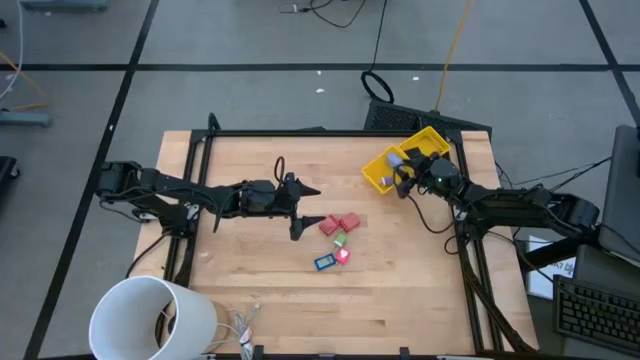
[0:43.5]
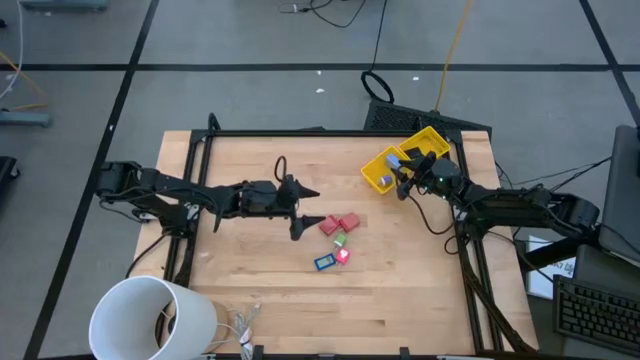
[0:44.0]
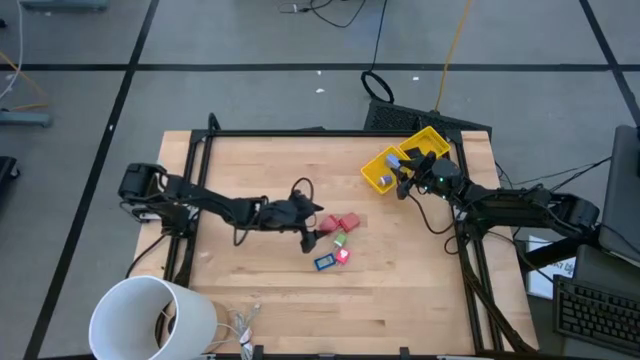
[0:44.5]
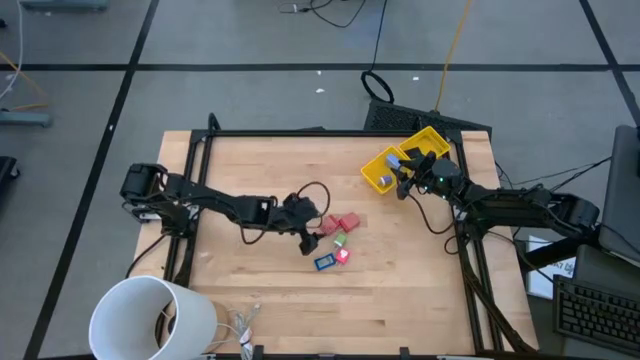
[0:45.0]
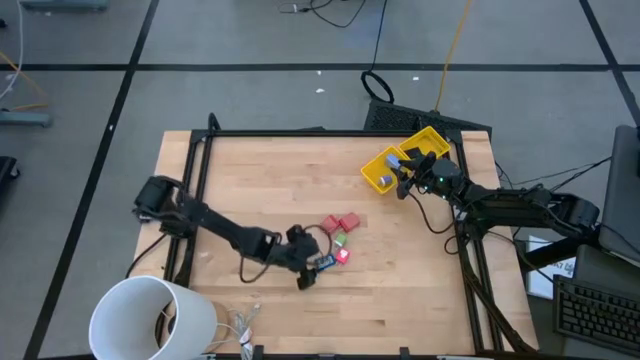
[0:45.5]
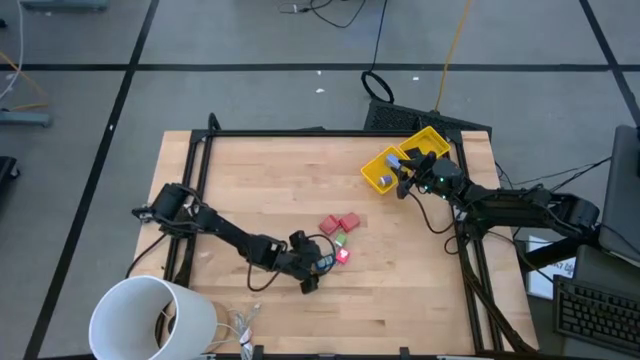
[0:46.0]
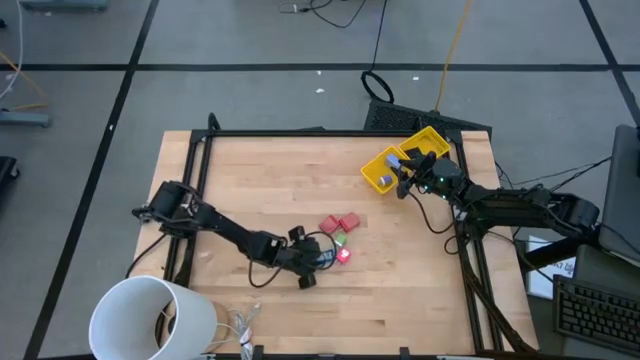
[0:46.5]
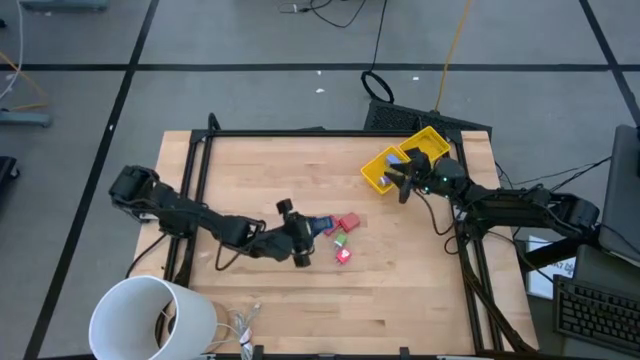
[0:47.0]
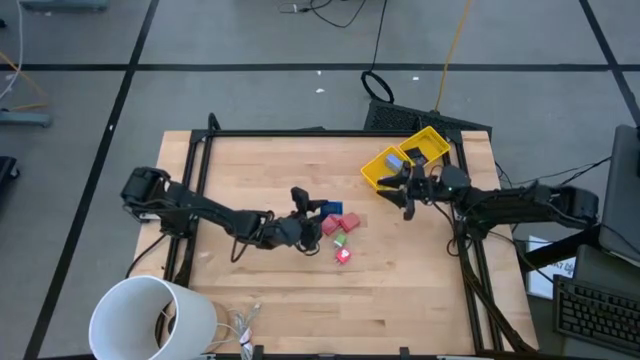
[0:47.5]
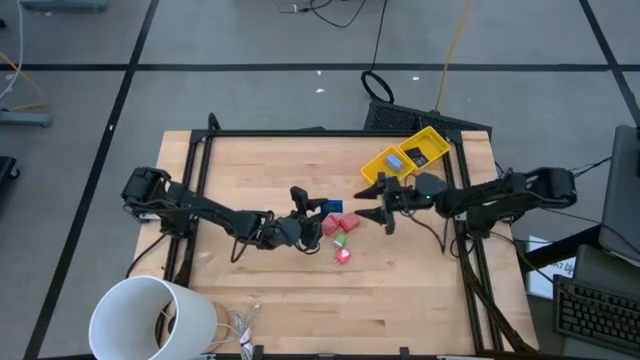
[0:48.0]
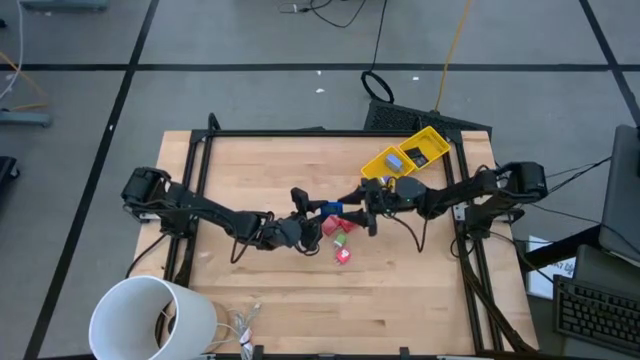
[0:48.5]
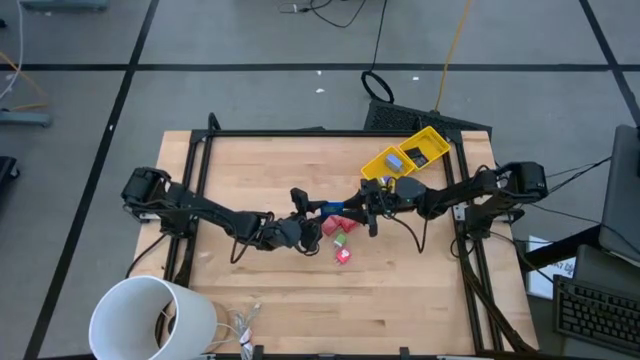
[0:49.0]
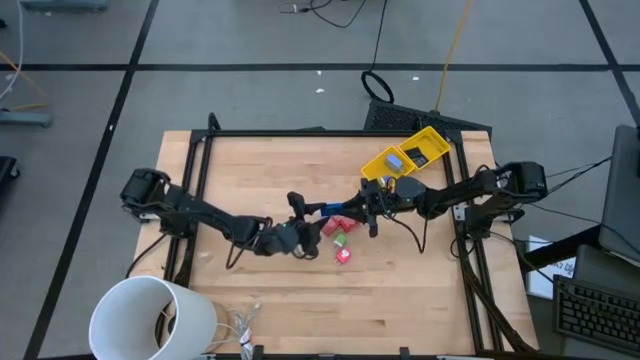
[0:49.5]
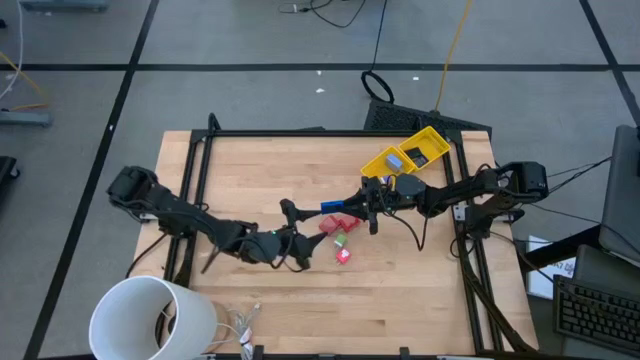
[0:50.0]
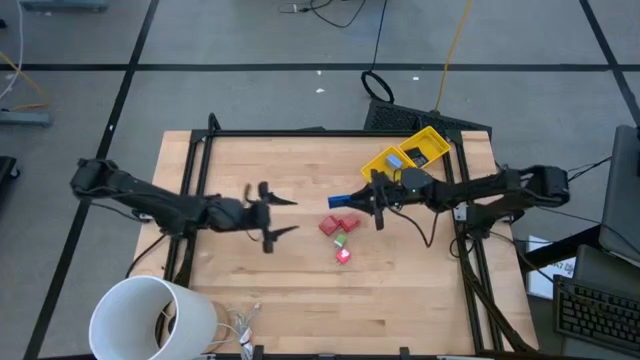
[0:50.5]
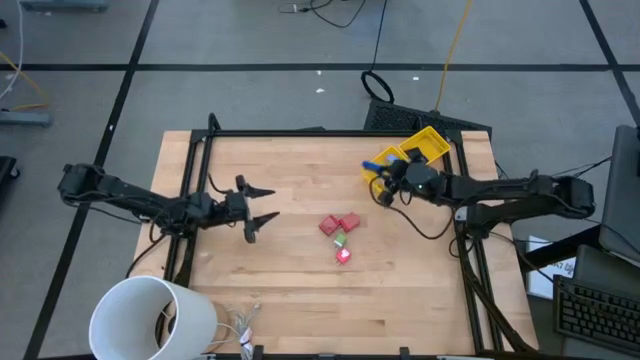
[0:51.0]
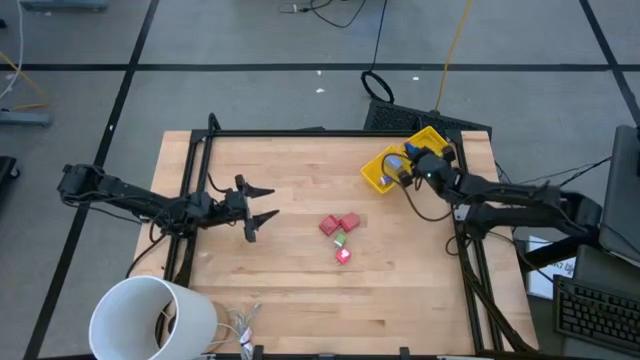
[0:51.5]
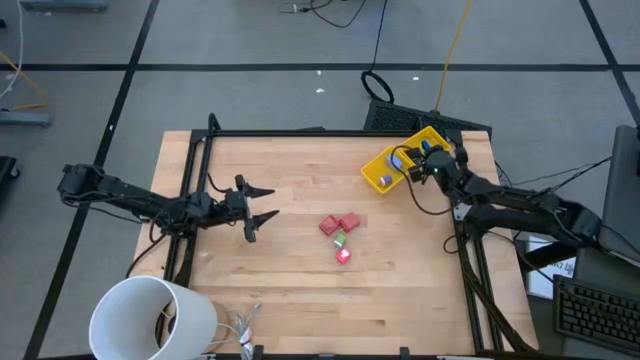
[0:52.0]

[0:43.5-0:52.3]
Task: Pick & Place Office items
Put the blue digital clock into the right yellow bin

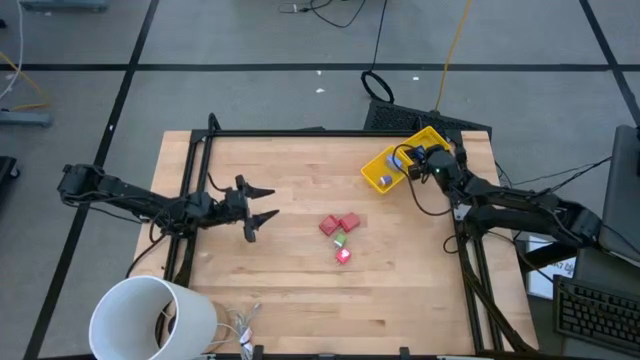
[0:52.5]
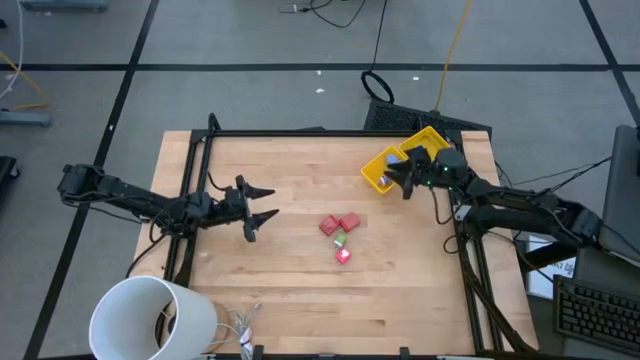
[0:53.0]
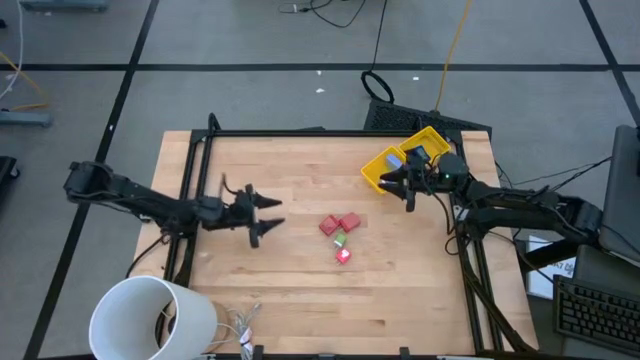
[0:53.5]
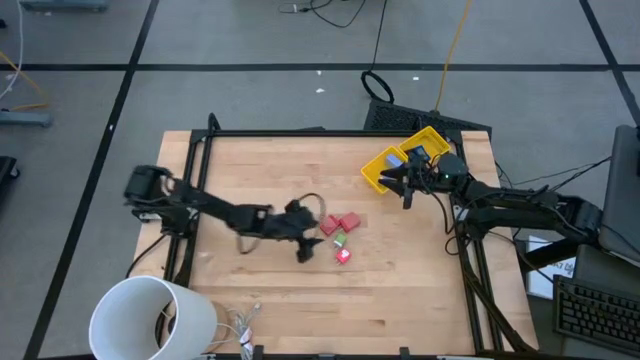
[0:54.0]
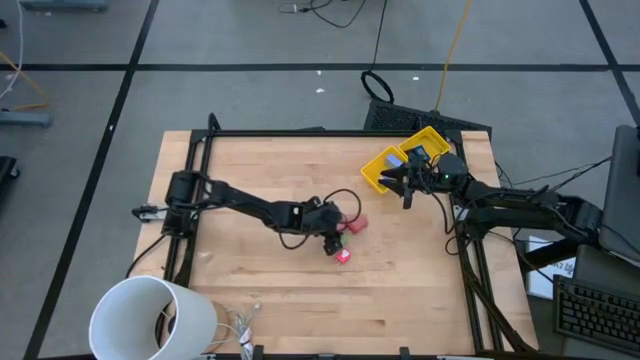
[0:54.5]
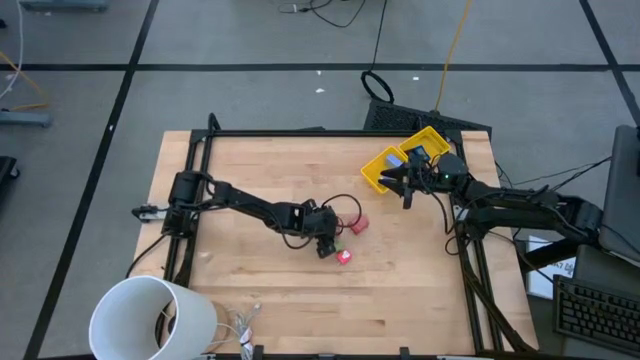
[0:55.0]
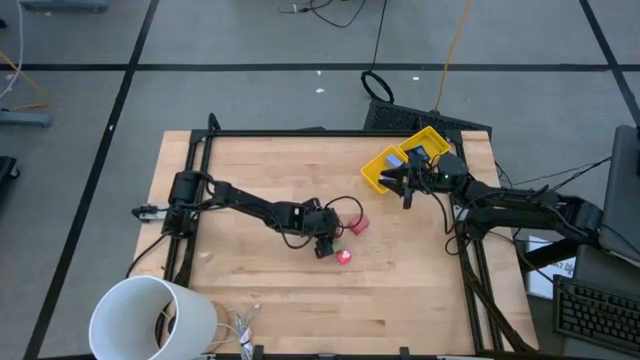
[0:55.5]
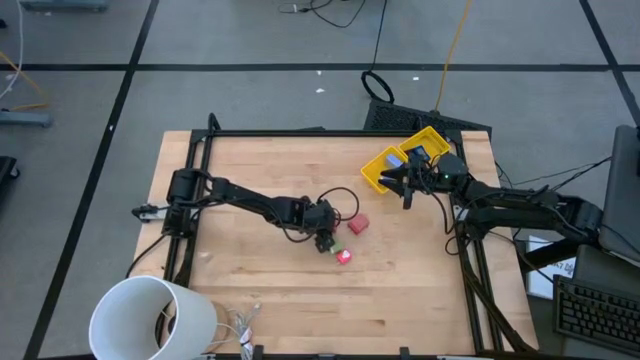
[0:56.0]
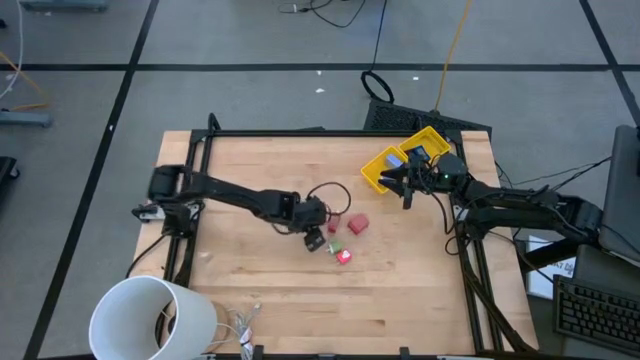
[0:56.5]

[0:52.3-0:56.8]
Put the left red charger adapter into the left yellow bin

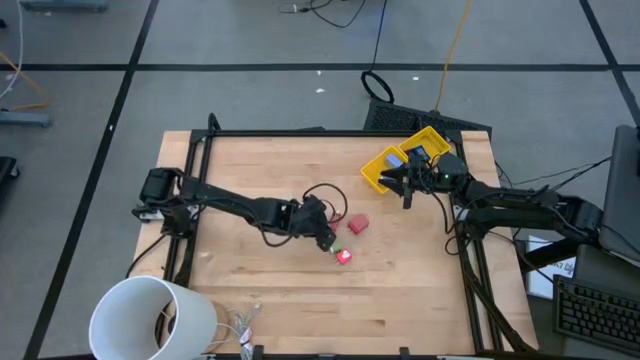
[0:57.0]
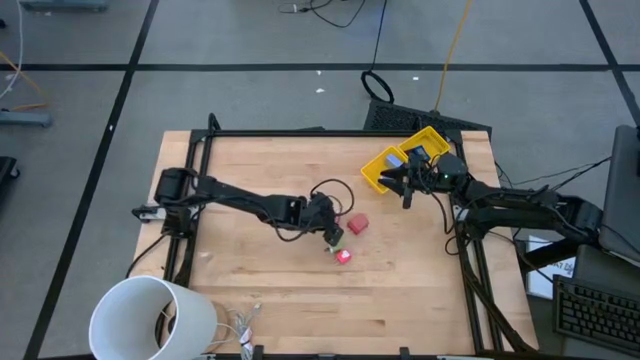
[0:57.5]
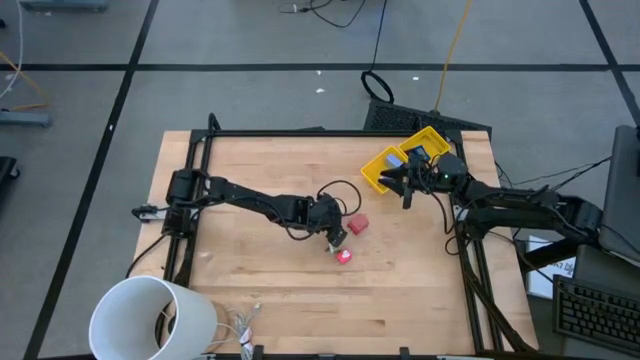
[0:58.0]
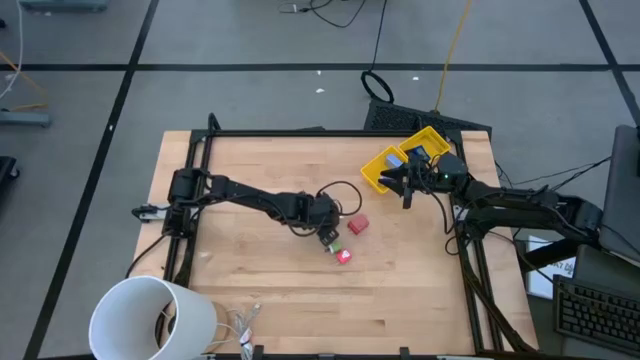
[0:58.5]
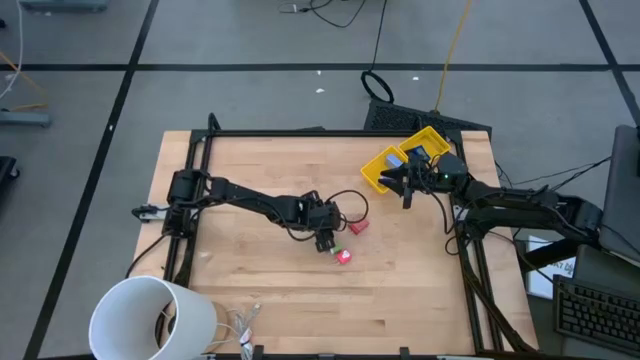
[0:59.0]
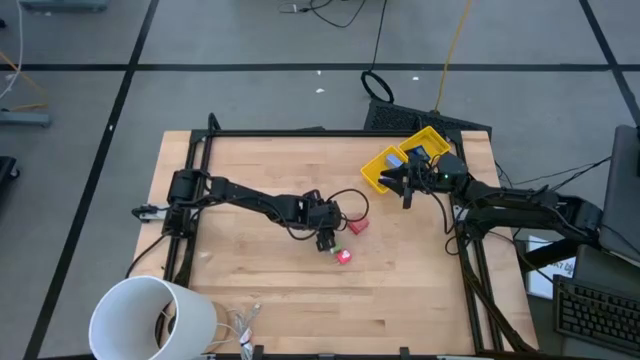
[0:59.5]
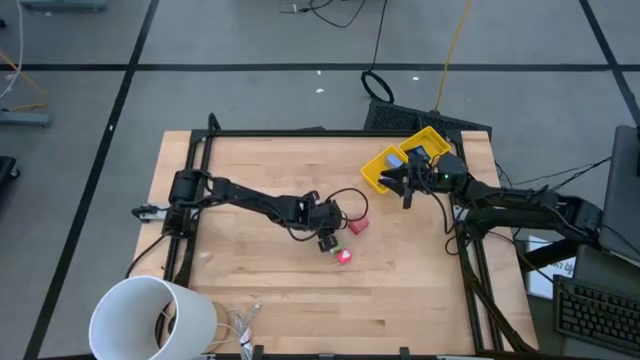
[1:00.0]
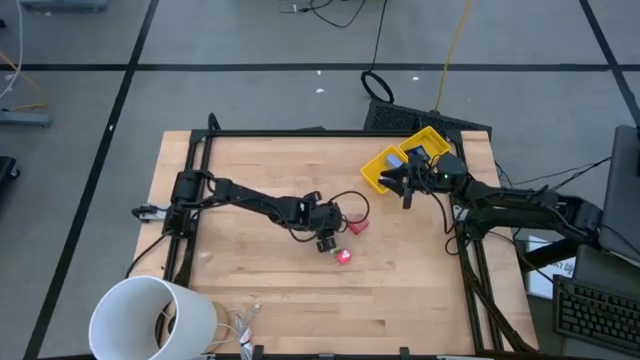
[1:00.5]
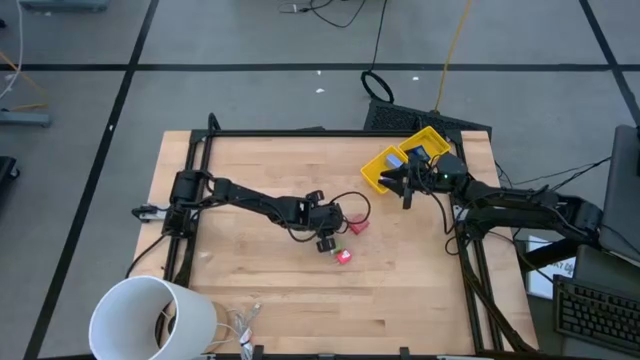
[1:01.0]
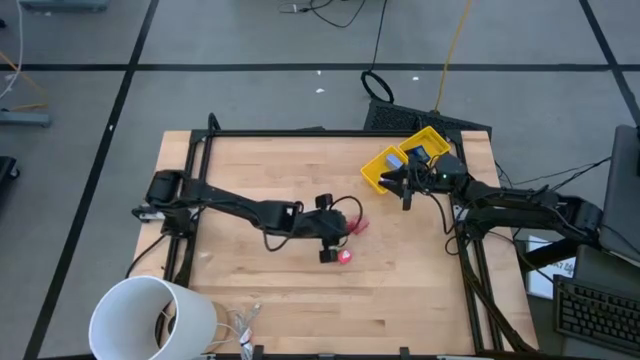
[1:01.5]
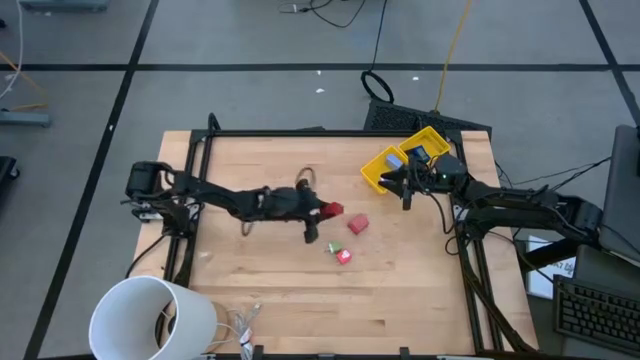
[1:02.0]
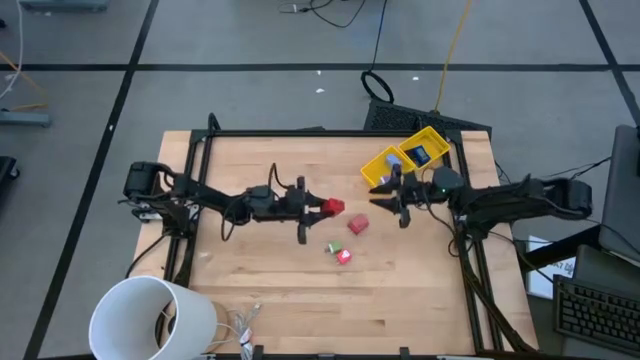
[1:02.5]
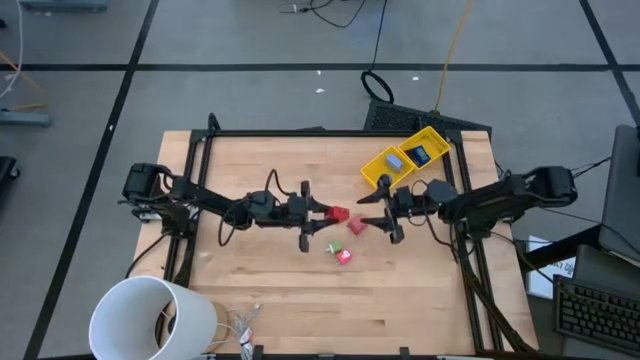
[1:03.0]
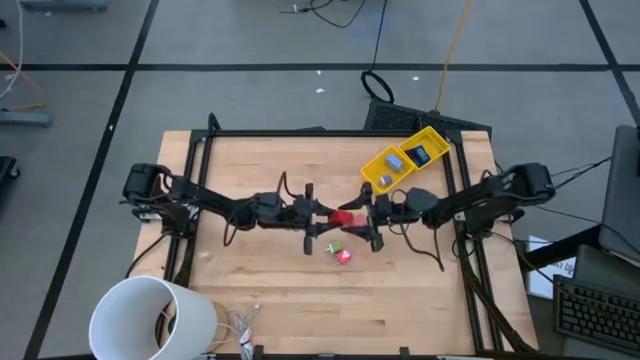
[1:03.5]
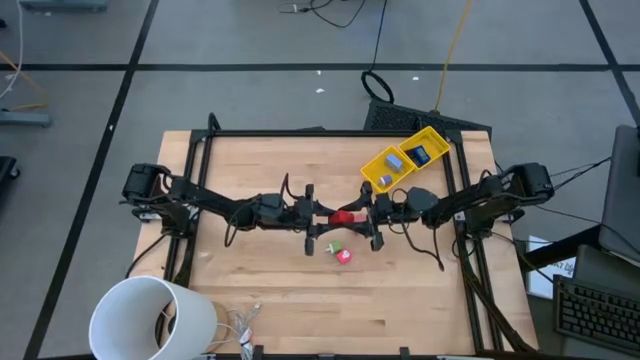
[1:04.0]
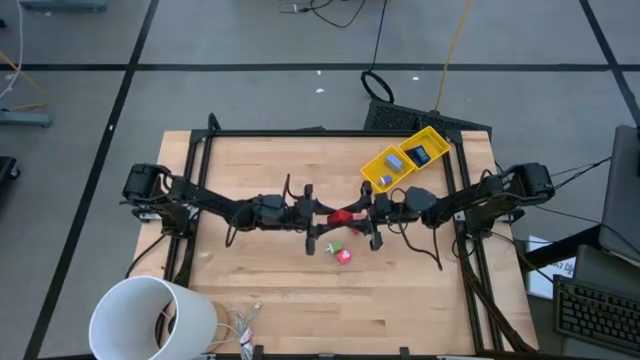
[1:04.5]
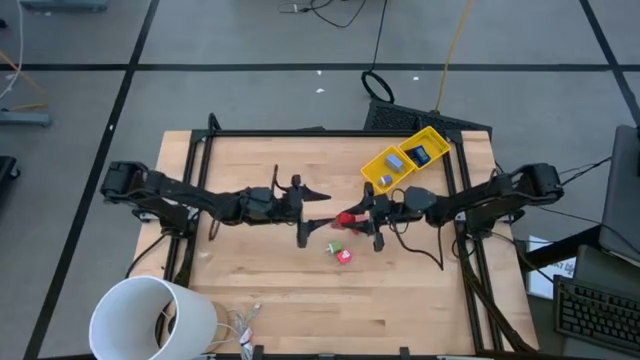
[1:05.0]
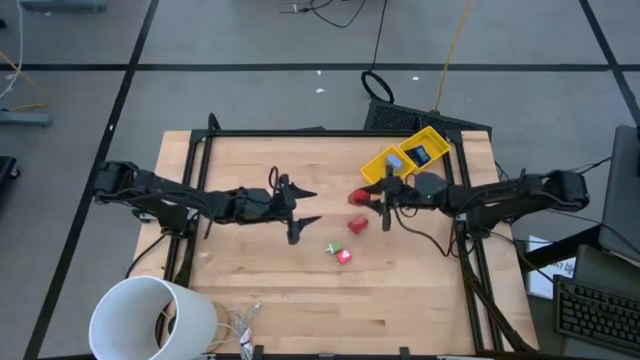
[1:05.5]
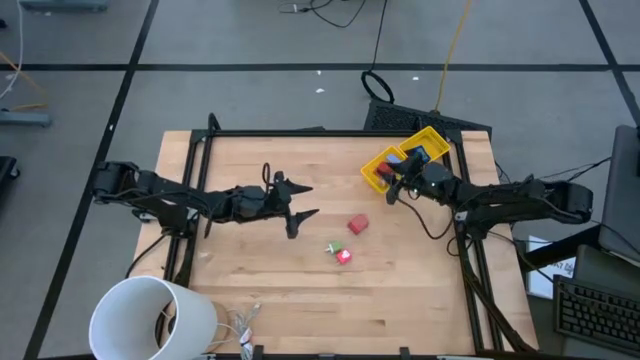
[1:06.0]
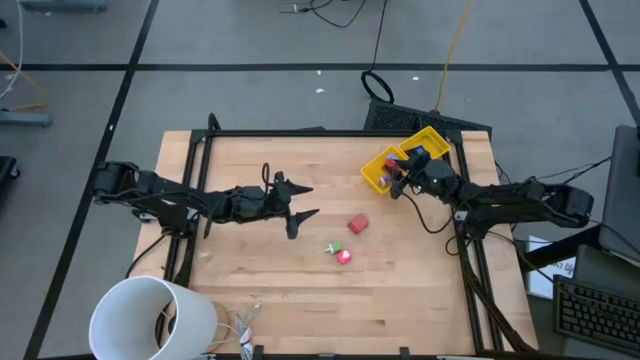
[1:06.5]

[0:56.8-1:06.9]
Put the left red charger adapter into the left yellow bin
